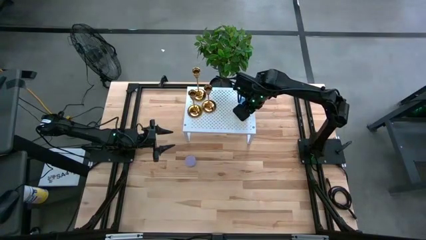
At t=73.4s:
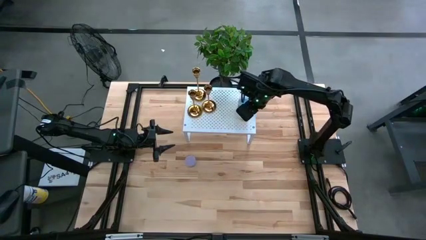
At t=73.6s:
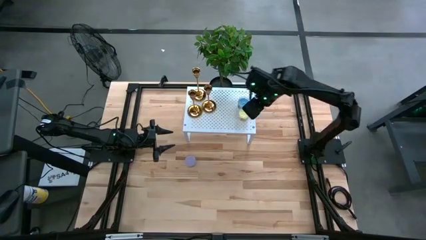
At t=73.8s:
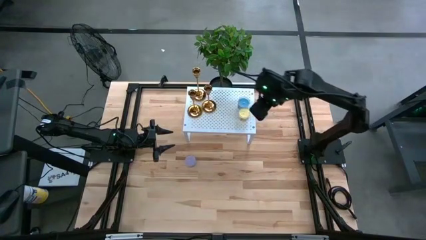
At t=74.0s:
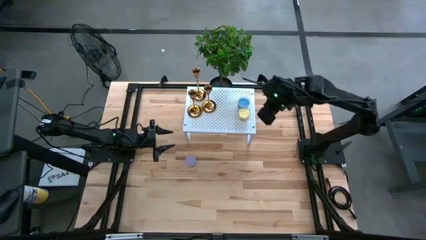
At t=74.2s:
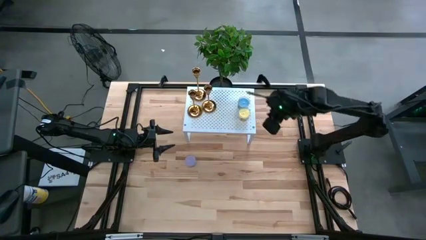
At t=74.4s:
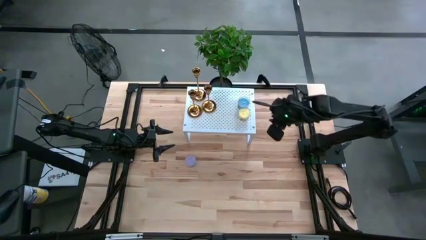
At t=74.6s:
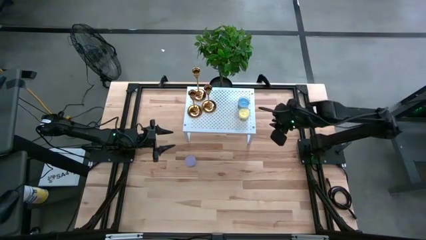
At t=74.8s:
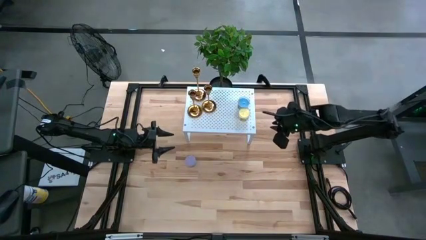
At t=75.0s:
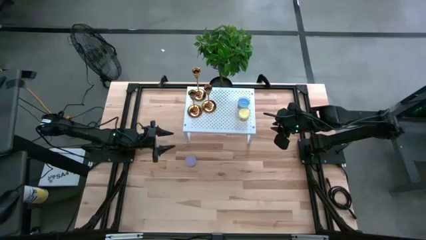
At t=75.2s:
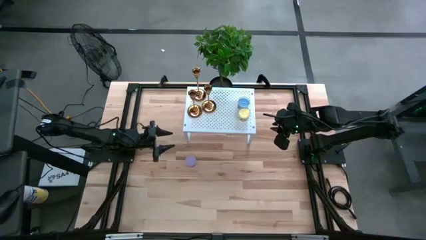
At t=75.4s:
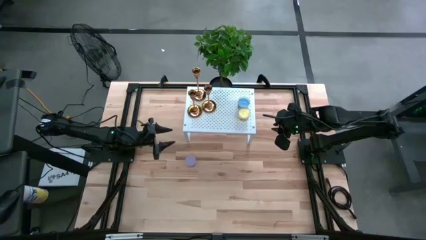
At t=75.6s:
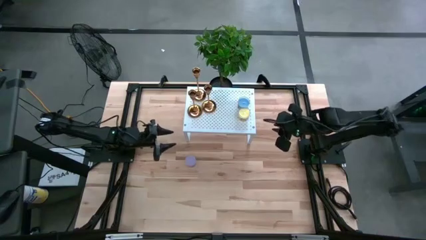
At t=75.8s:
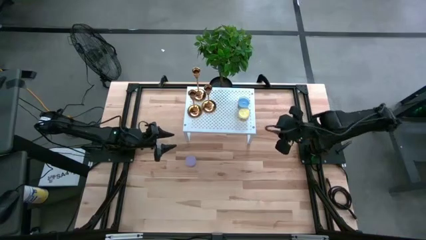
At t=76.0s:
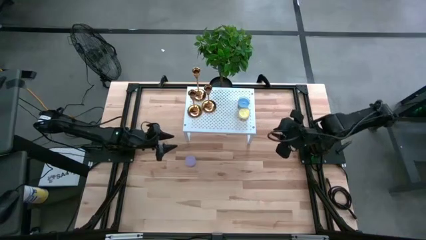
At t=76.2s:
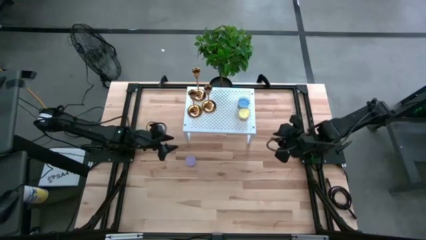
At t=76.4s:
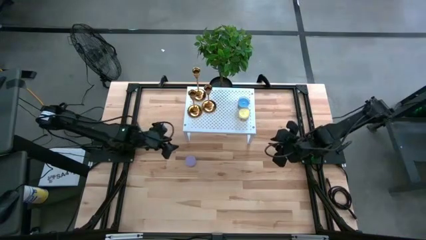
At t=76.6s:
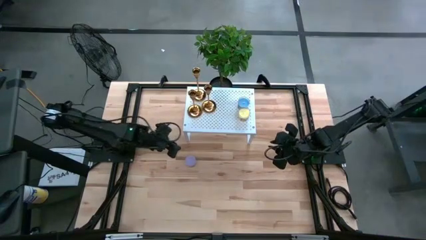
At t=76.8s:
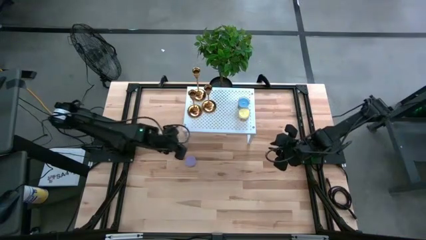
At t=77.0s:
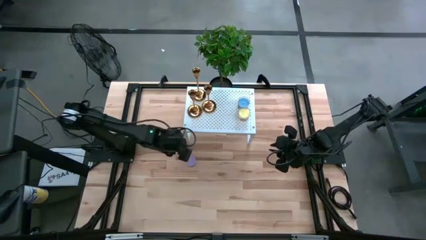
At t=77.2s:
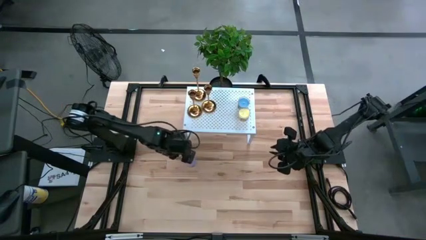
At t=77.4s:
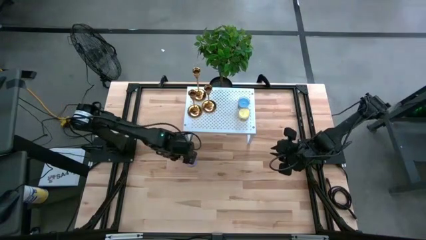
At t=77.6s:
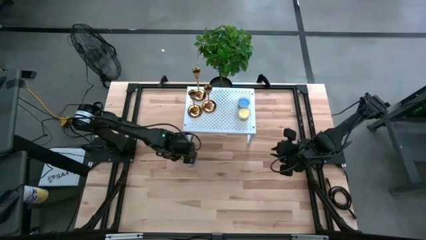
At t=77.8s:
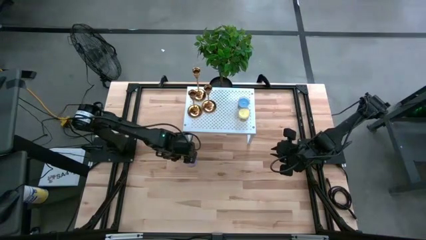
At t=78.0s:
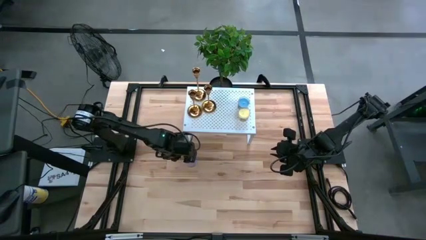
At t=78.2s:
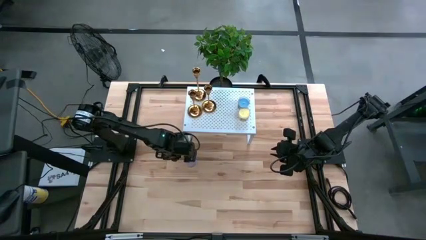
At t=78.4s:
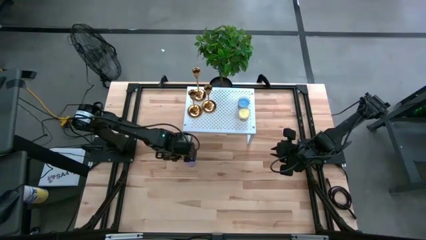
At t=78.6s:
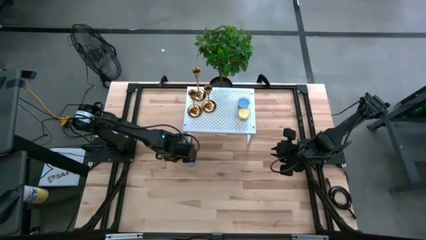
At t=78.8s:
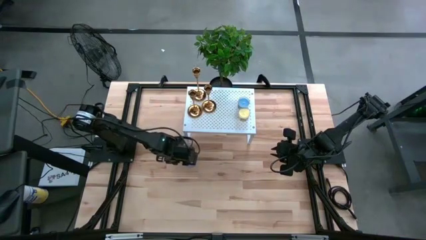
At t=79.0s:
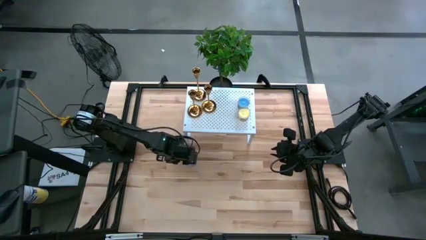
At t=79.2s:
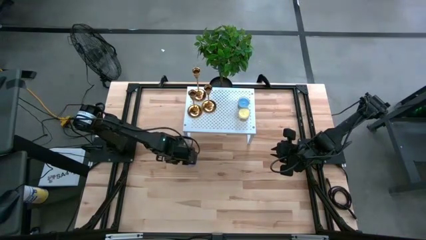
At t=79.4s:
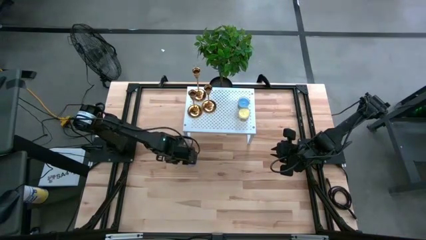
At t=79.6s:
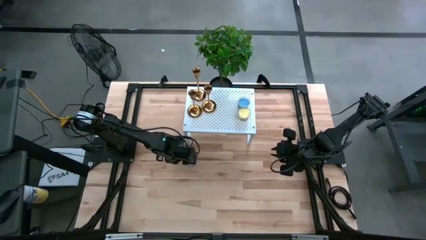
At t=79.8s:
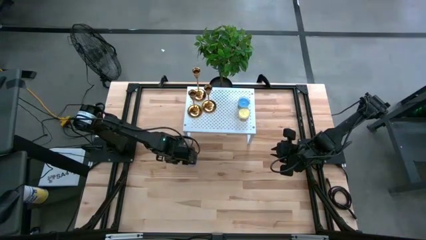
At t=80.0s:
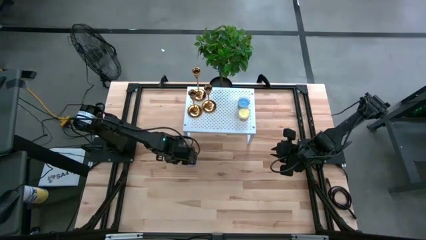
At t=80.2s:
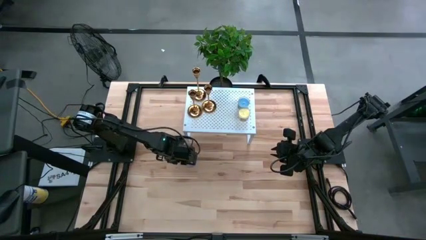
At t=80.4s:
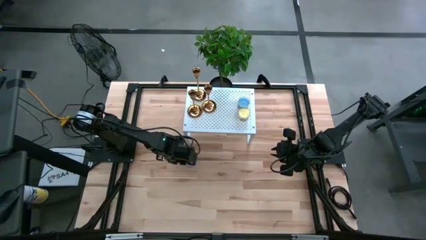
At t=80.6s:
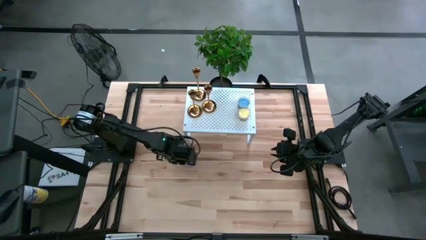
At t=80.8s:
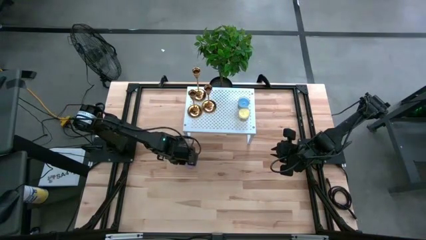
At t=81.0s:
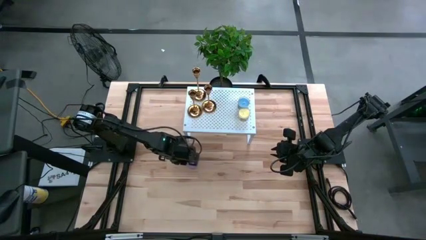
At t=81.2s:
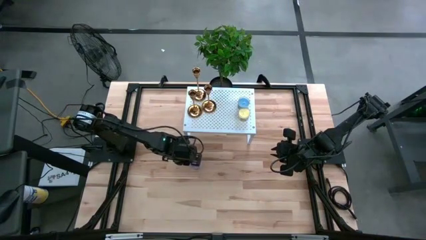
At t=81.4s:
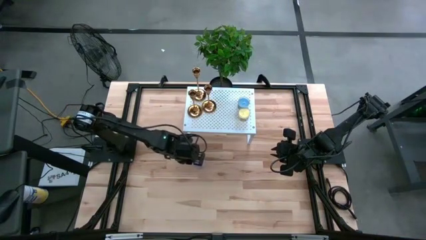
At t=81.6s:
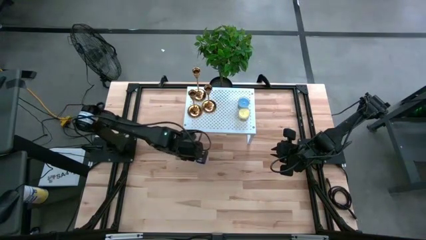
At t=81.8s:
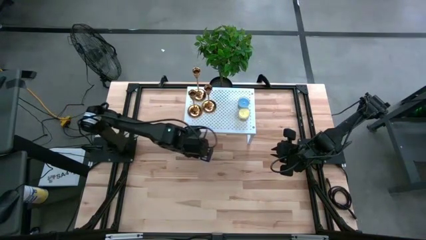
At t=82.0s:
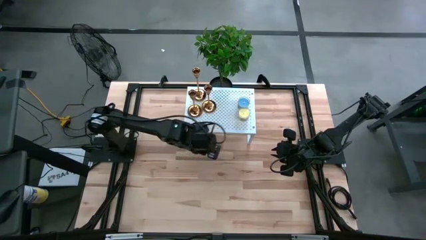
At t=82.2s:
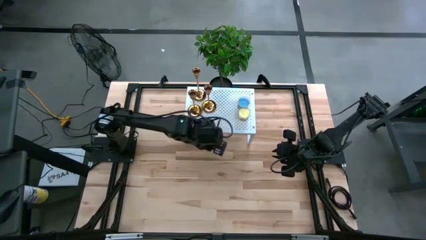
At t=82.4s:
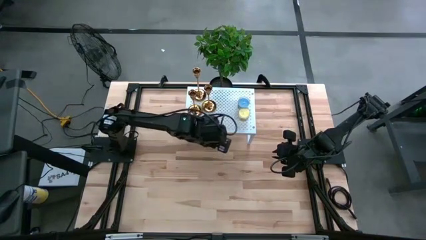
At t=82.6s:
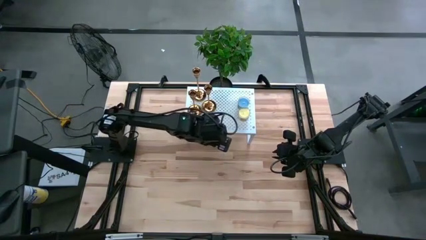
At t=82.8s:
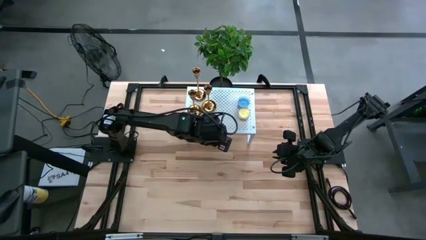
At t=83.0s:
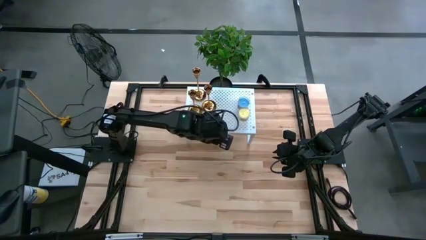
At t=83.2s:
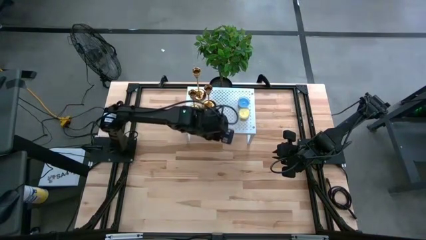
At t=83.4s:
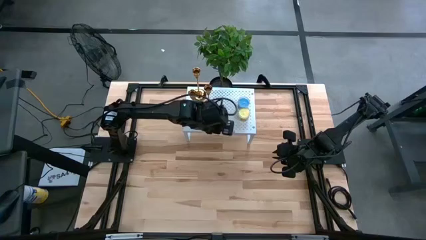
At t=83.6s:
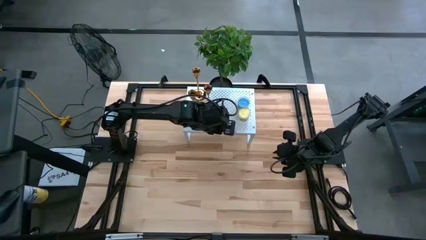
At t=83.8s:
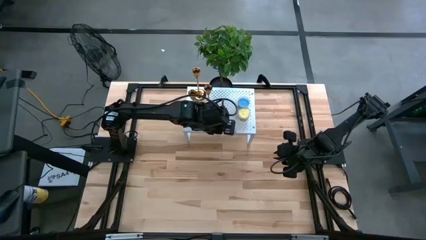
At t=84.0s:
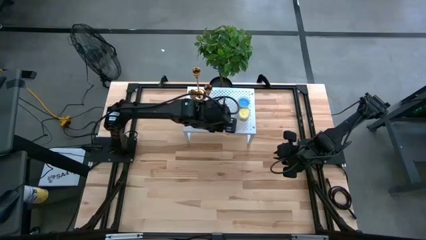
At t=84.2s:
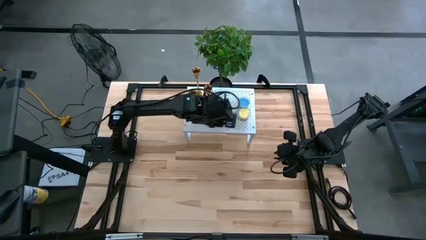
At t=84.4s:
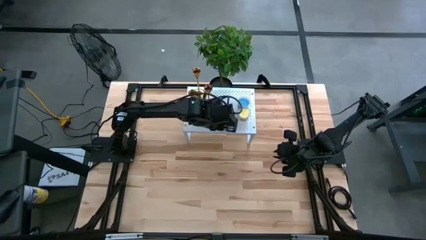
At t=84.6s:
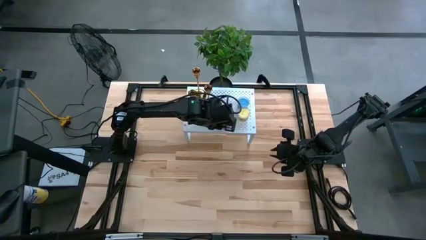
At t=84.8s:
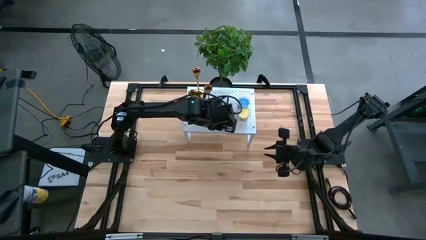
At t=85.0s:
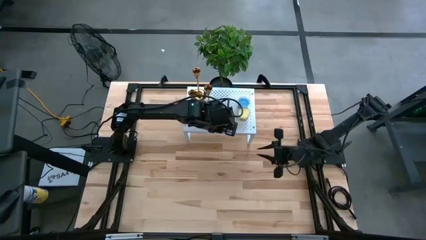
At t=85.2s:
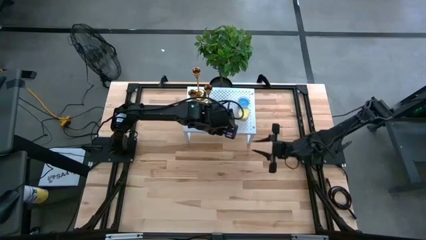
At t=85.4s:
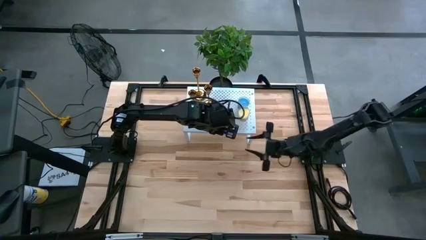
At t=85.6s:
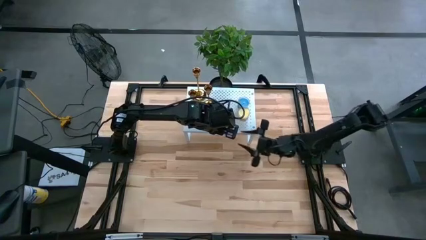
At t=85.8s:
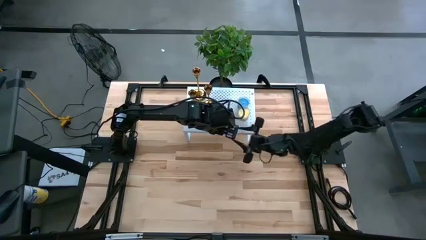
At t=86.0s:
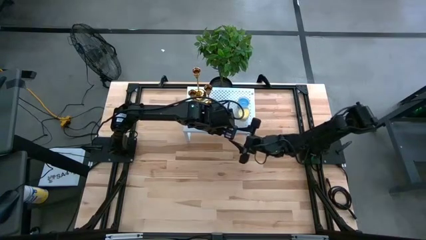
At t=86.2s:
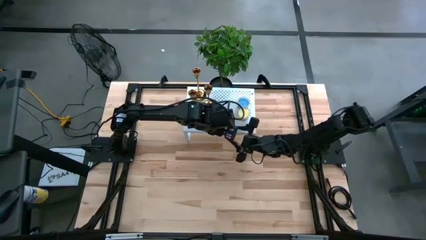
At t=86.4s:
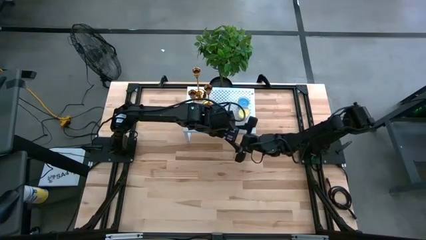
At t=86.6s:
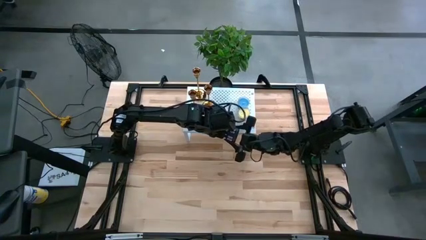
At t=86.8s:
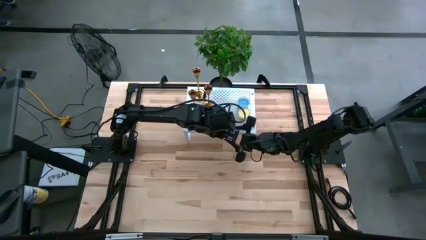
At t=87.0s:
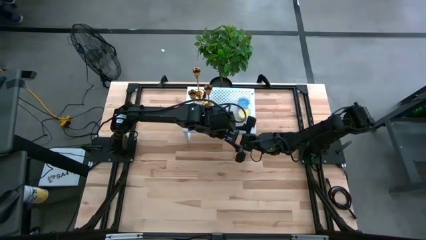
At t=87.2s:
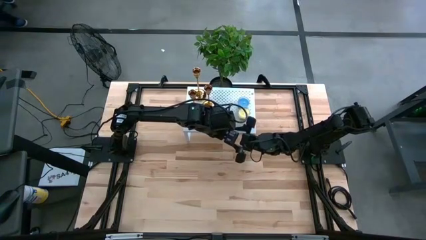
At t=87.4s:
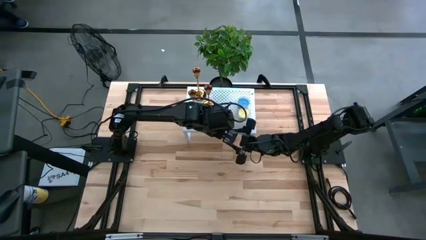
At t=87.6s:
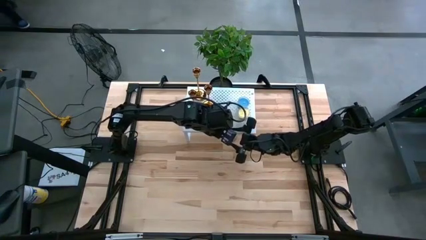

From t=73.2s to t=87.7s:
Task: Pick & Place candle stick holders
Put the violet scented candle on the shelf

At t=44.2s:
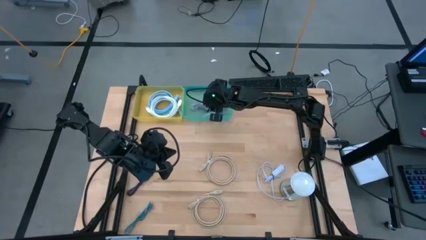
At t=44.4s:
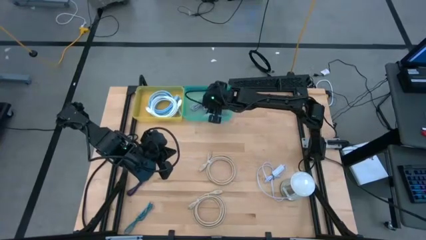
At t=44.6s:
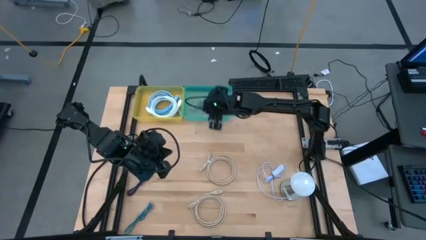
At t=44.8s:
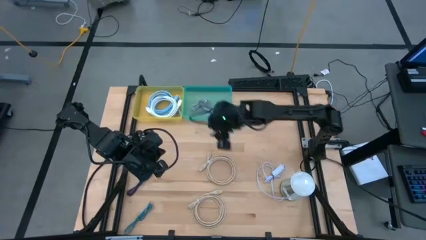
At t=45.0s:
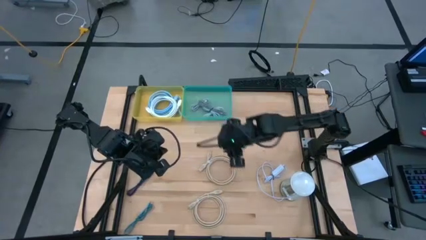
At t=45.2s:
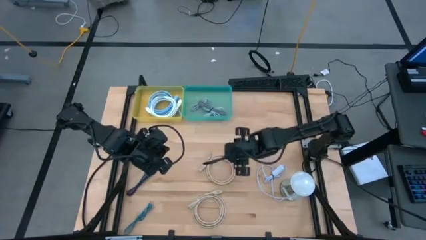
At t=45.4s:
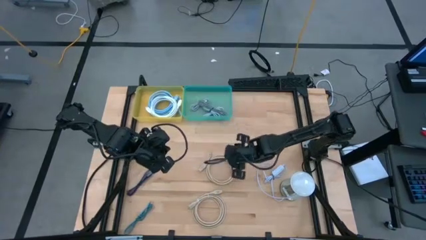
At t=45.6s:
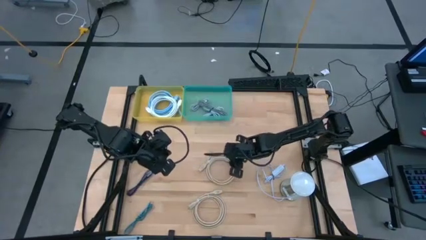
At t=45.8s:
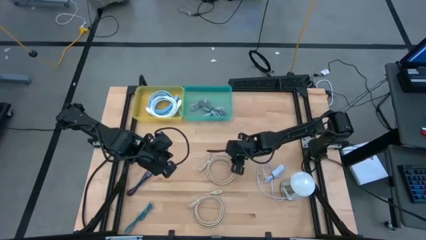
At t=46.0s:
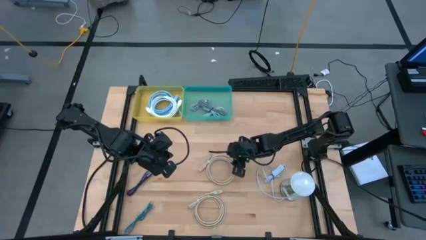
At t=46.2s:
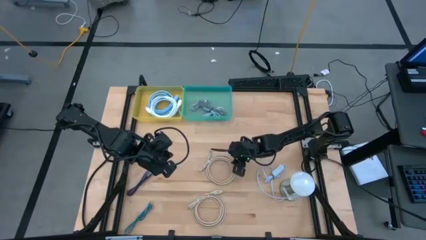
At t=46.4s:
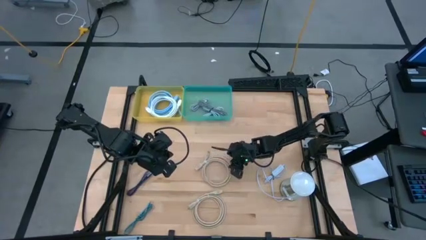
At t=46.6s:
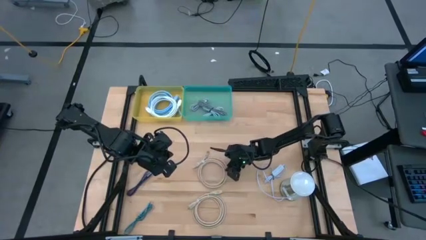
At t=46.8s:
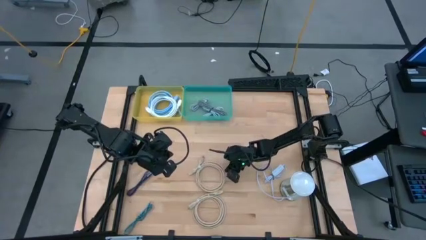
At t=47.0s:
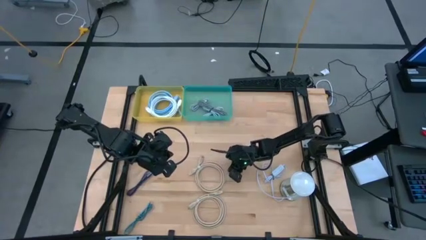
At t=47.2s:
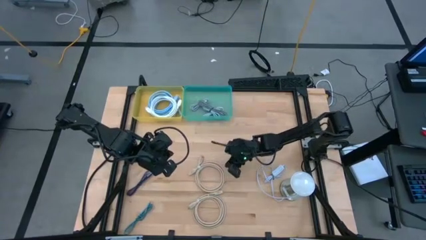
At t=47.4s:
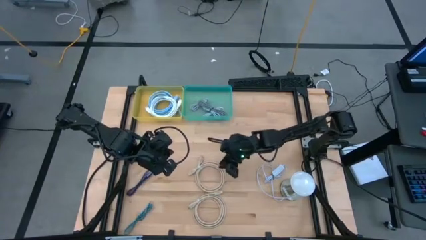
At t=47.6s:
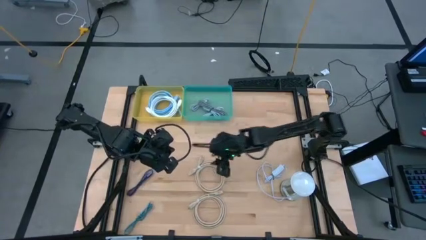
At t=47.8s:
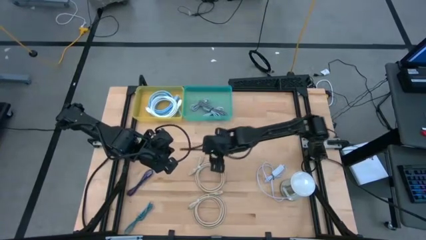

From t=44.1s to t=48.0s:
Task: Pick & Place USB Port
Put the top brown HDMI cable into the yellow bin
